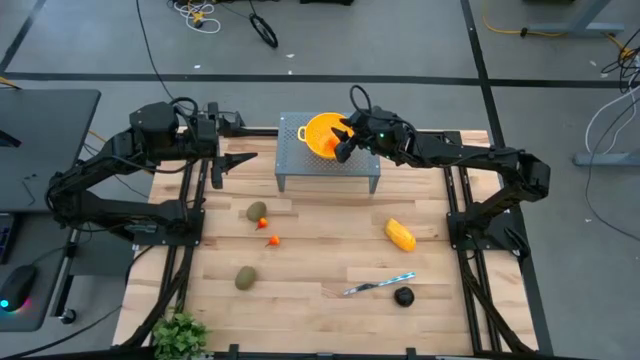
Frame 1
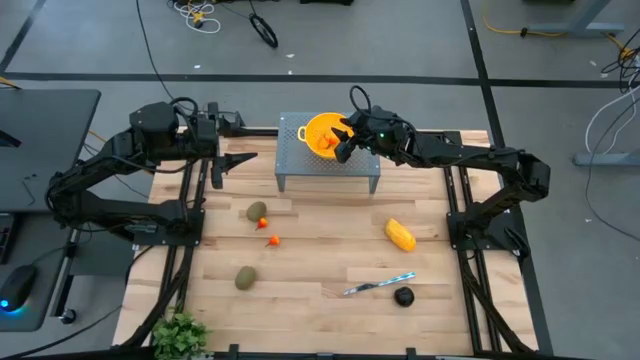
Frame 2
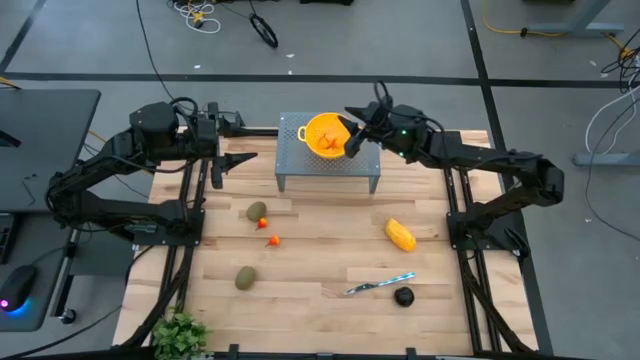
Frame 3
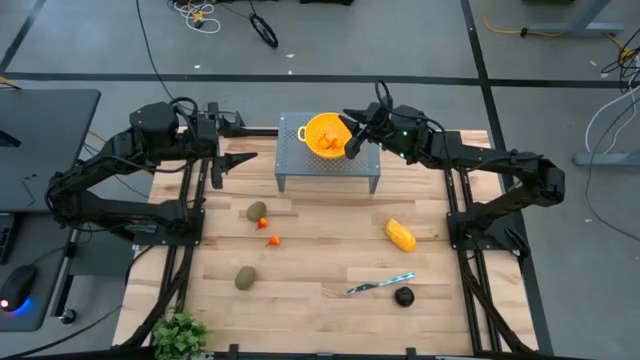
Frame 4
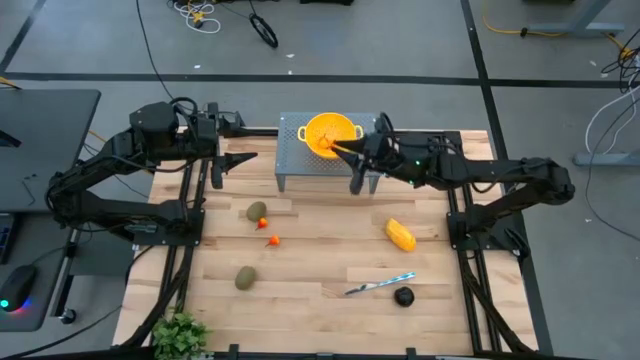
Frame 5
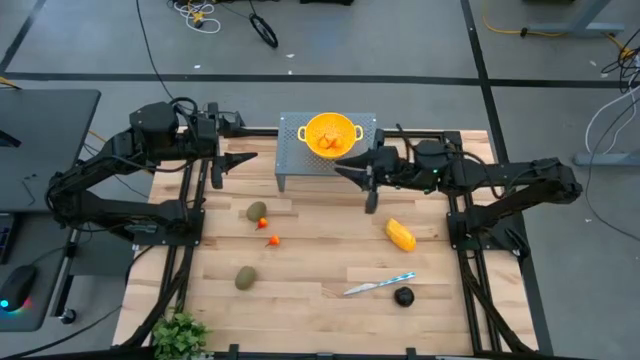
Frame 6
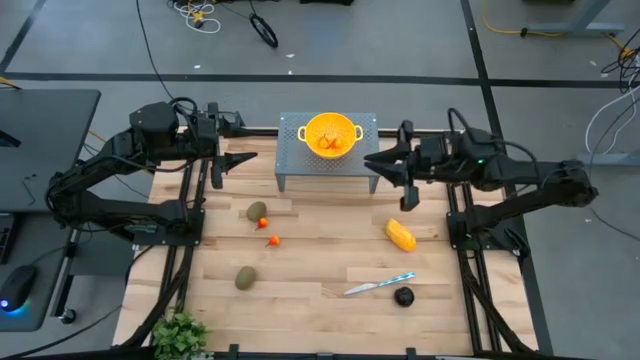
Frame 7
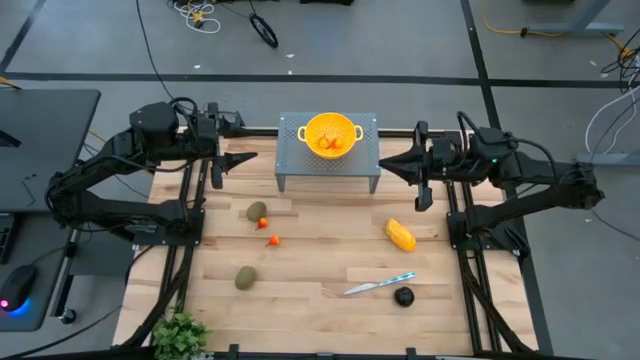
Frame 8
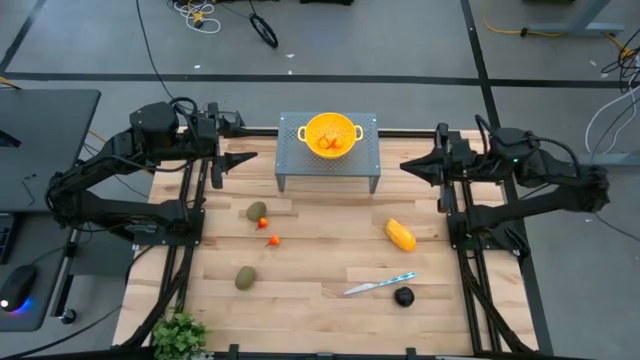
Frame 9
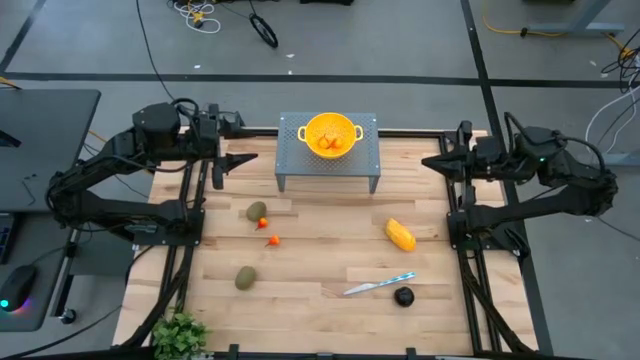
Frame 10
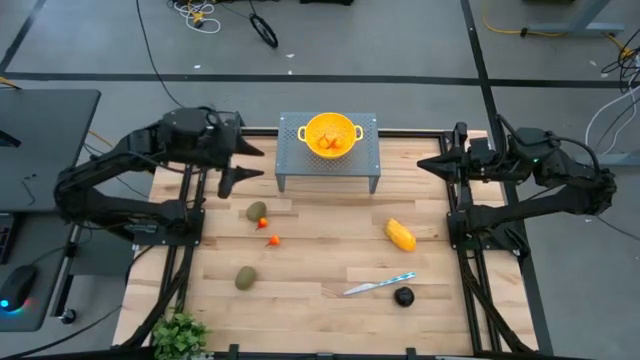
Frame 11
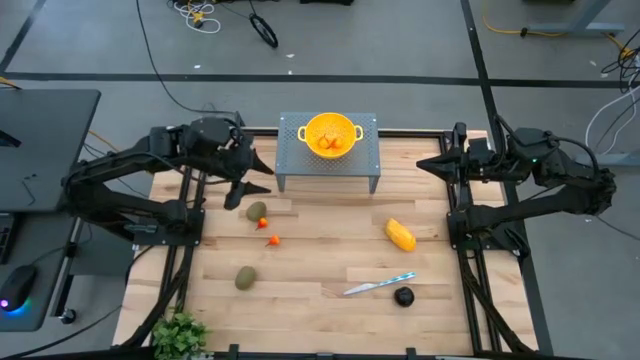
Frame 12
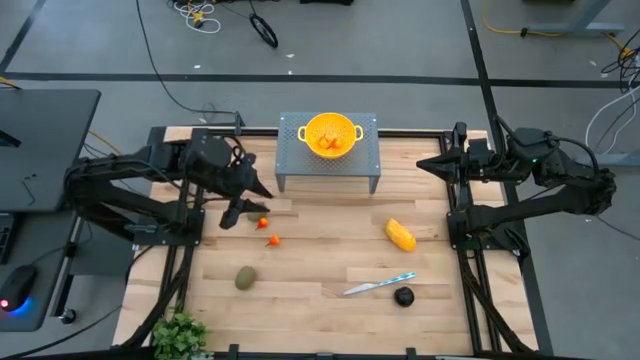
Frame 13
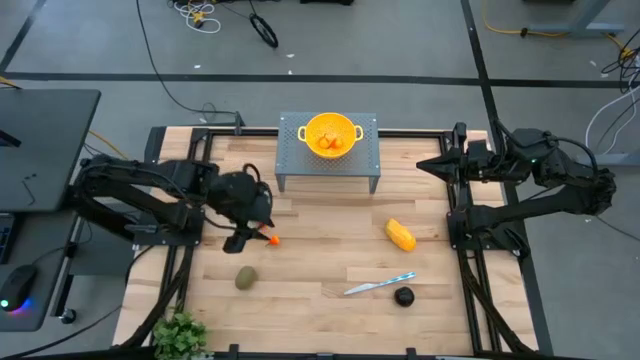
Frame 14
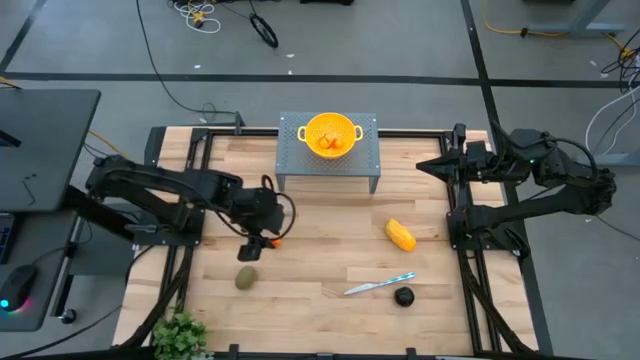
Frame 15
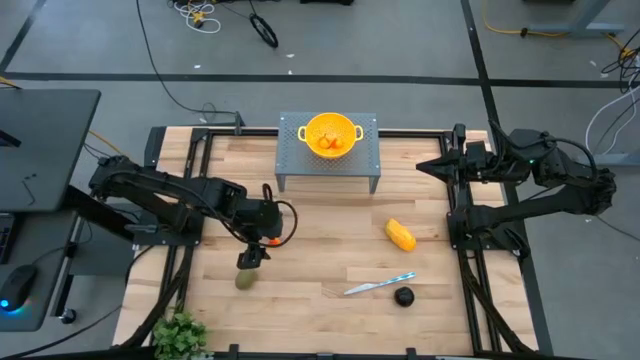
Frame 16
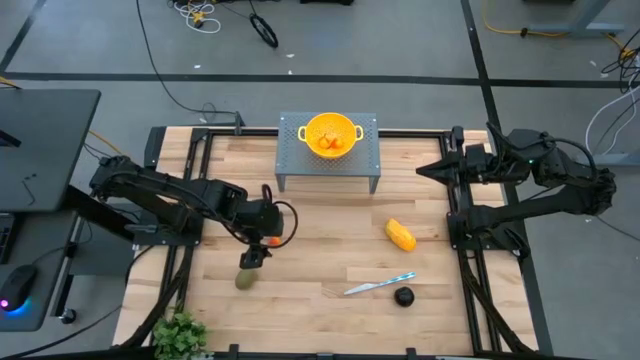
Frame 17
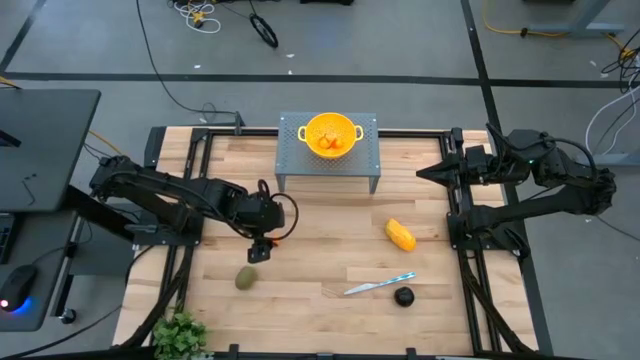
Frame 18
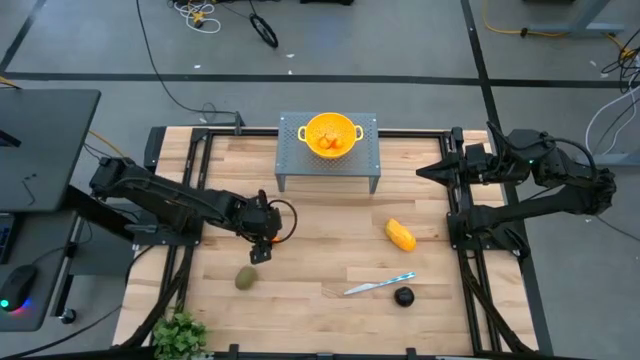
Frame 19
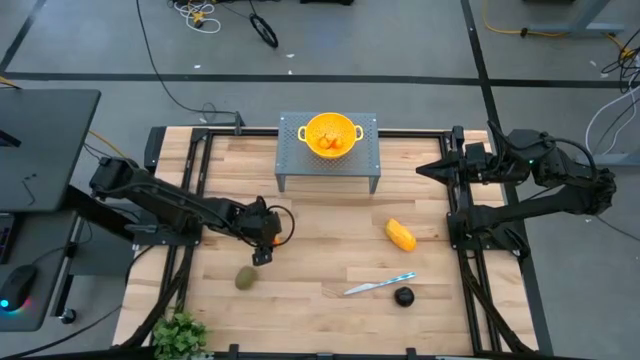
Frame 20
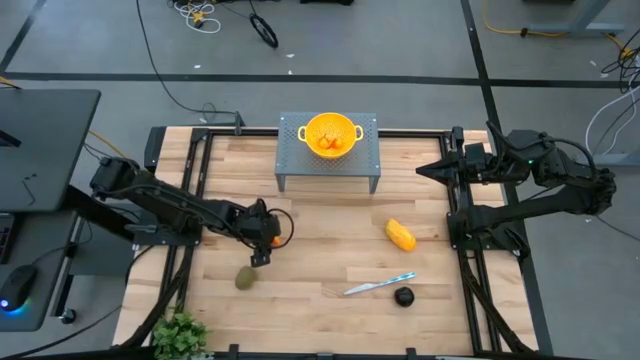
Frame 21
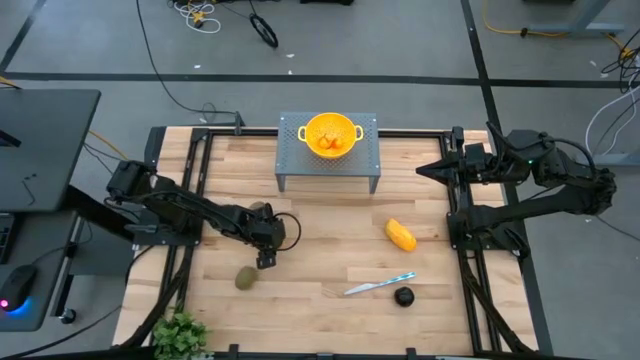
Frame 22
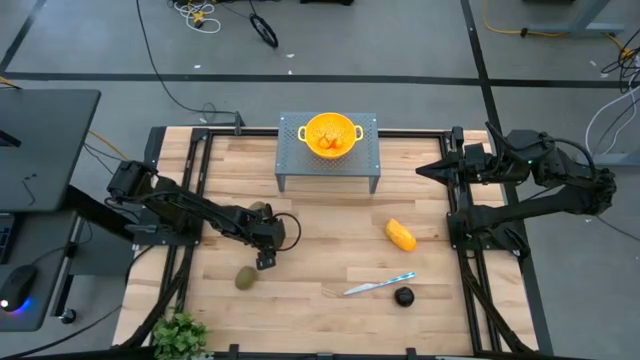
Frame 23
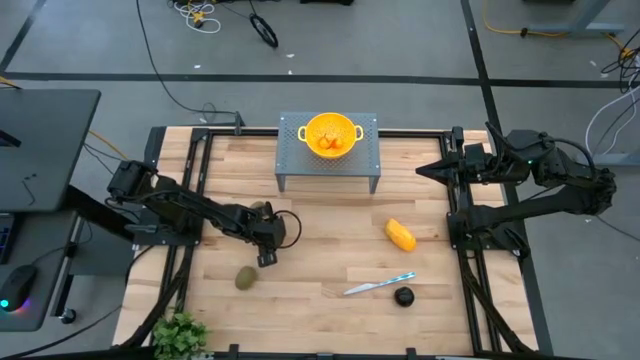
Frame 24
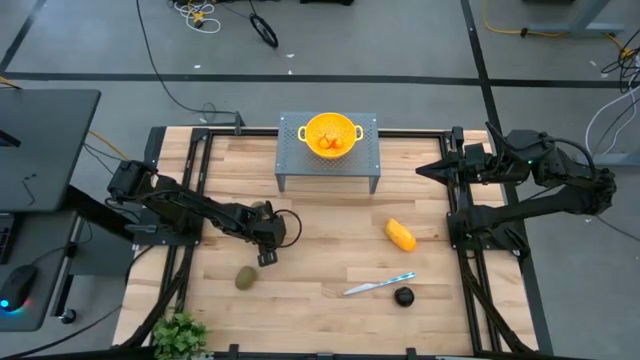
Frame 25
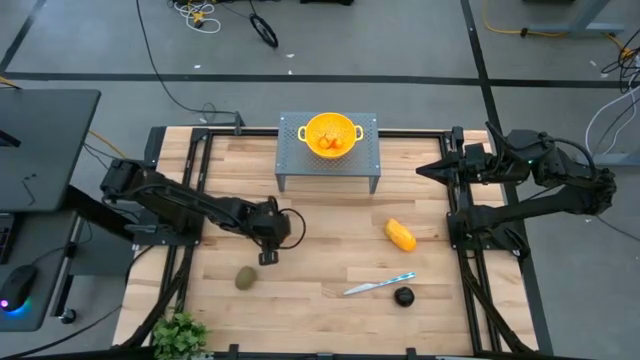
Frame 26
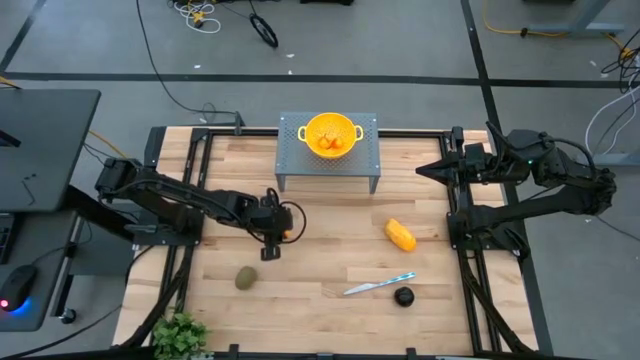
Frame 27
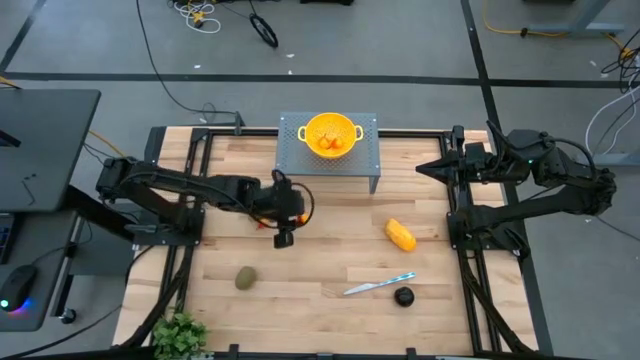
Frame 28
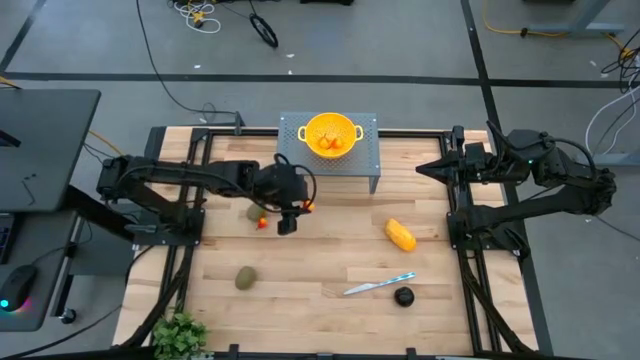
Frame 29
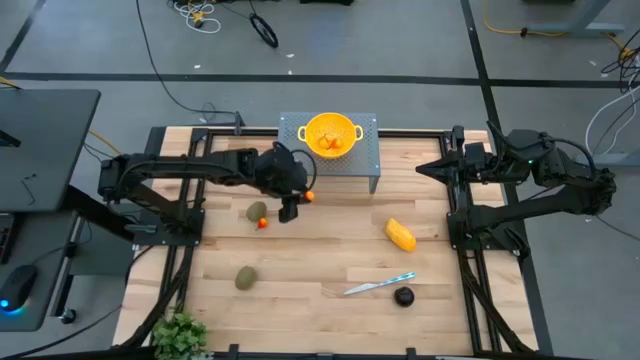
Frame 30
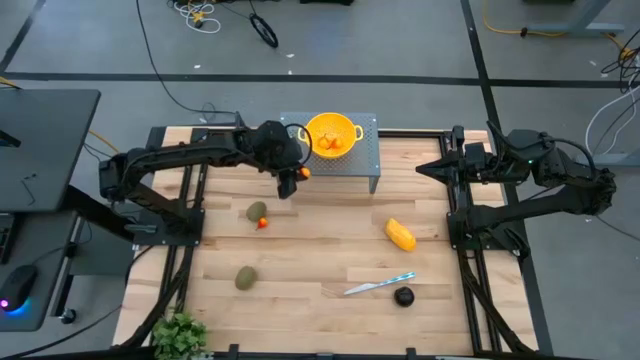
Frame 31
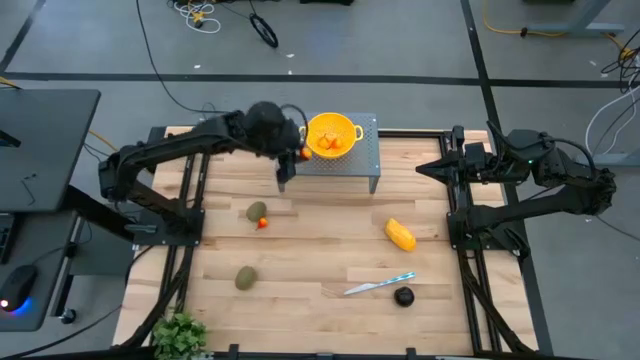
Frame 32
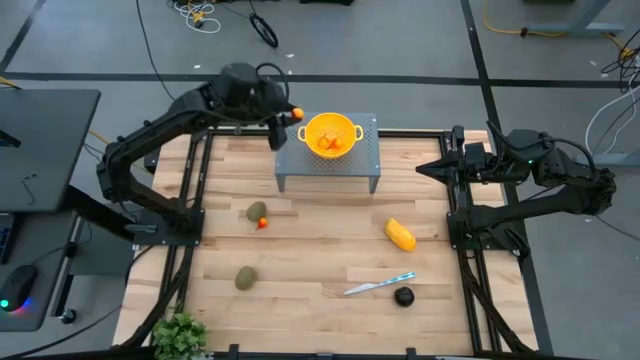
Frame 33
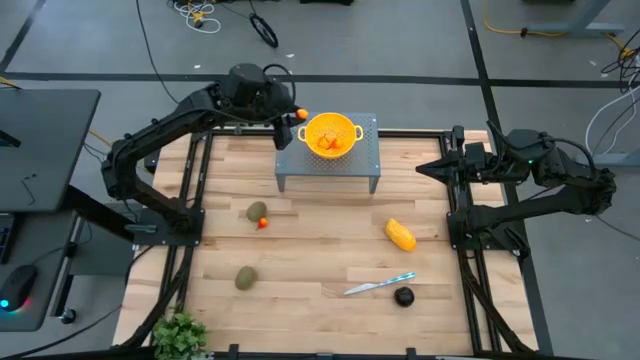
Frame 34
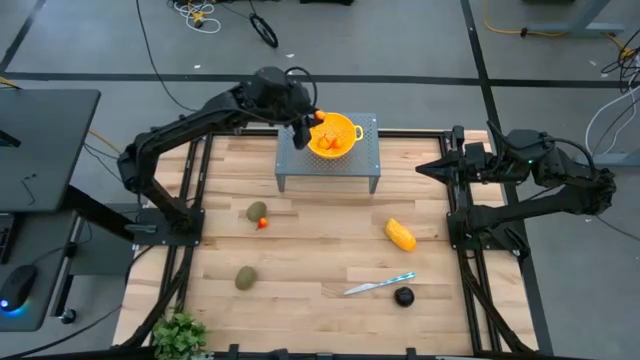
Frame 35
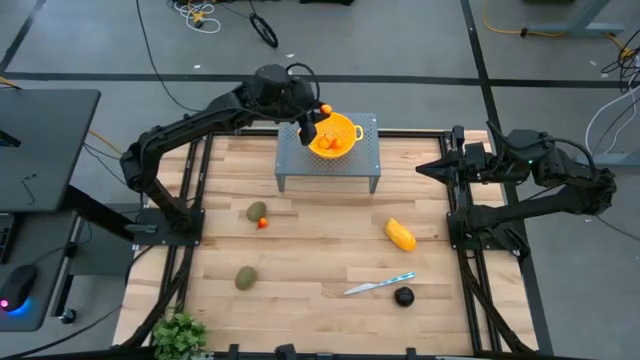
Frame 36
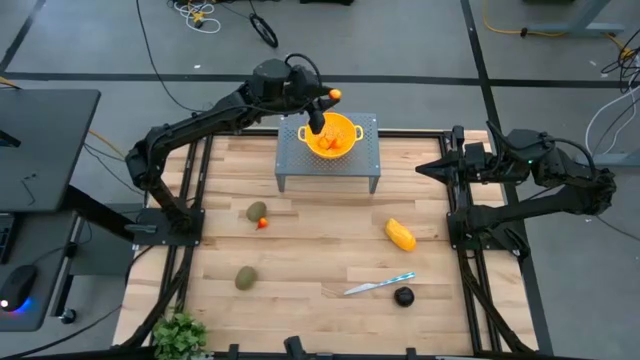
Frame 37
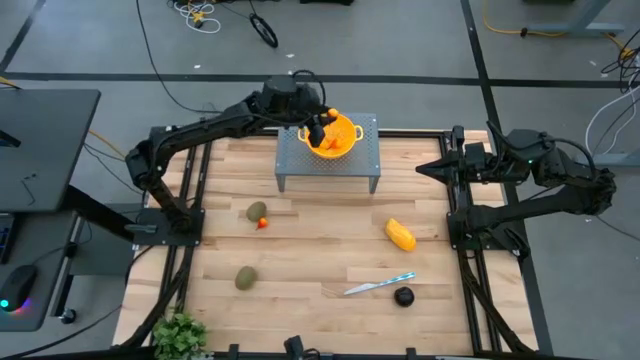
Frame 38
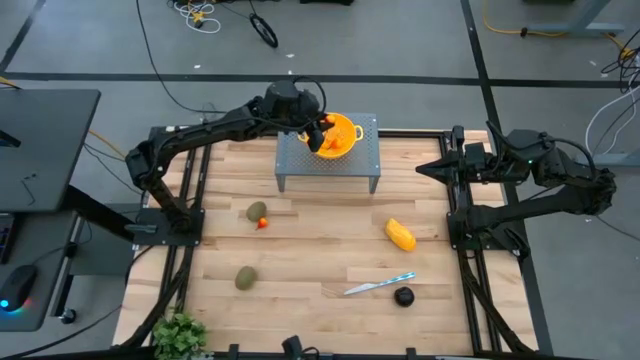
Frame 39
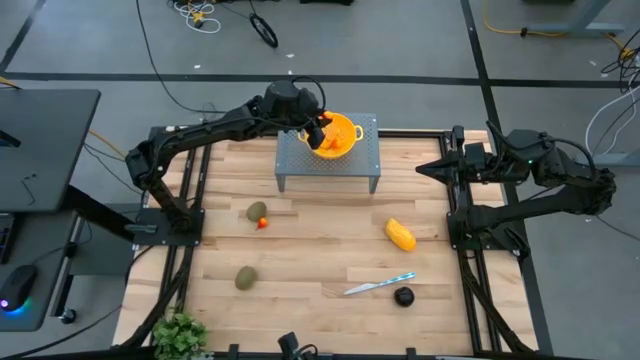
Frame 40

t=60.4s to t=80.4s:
Task: Pick & Place Fruit
Put the yellow pear into the yellow strainer bowl on the shelf

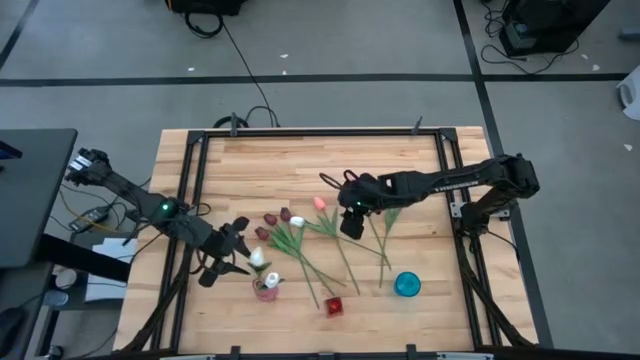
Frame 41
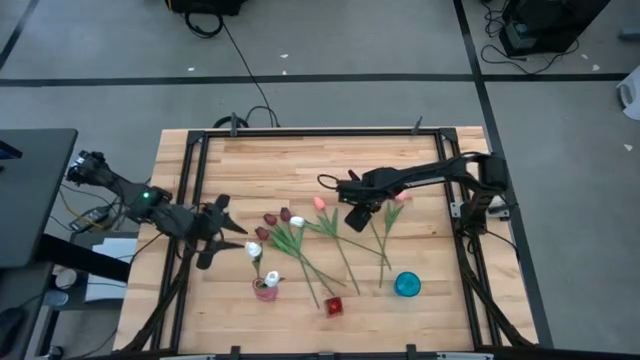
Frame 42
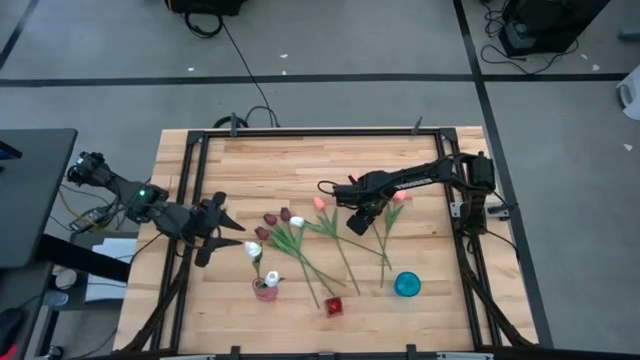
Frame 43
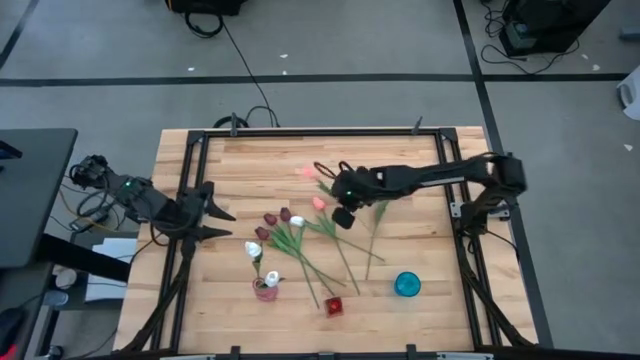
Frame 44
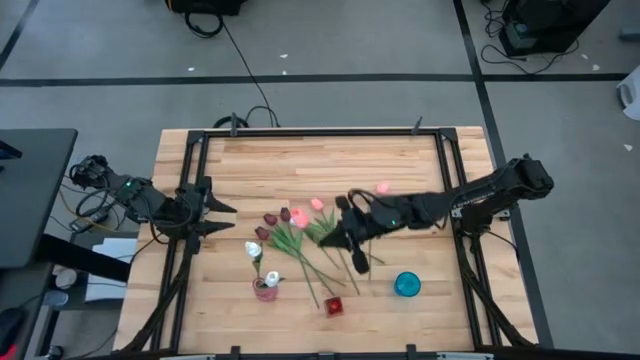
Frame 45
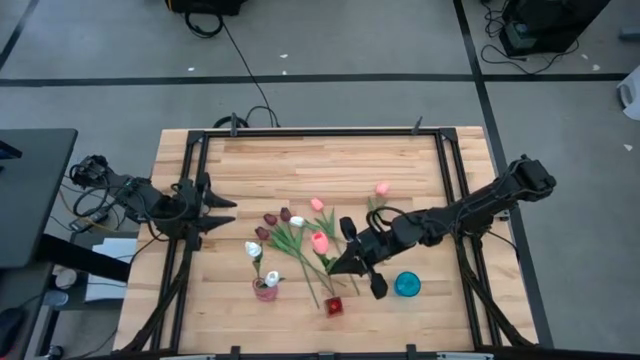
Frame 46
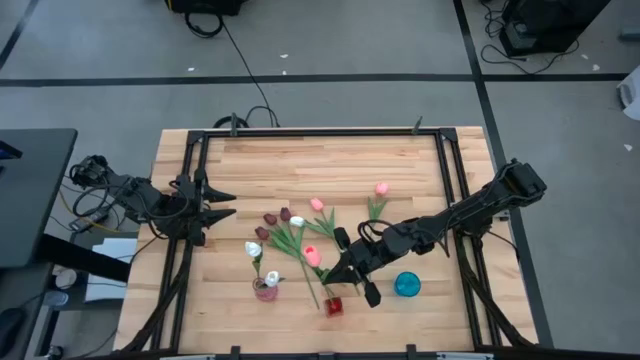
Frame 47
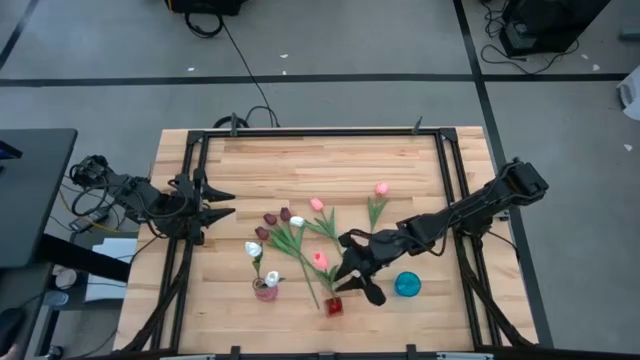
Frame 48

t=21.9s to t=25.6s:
Task: Sort flowers into vase by color
Put the middle pink flower into the red vase
